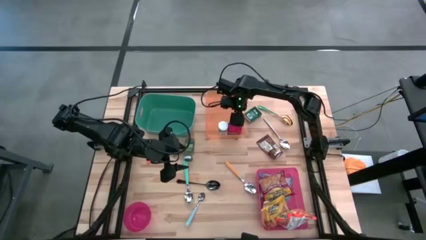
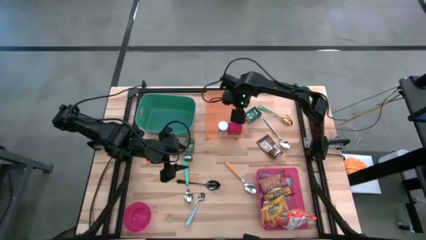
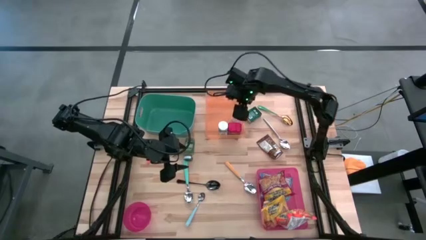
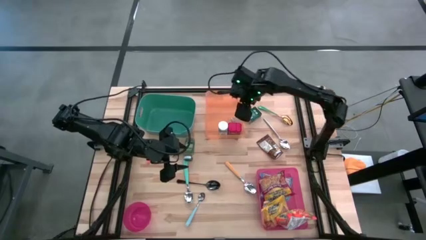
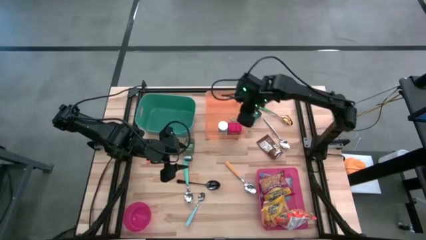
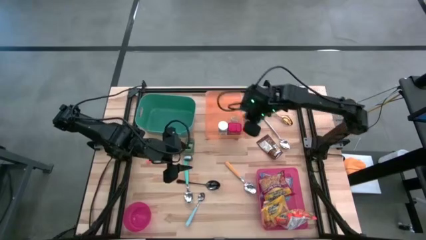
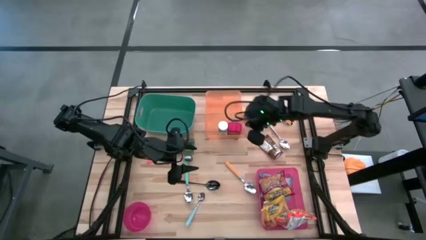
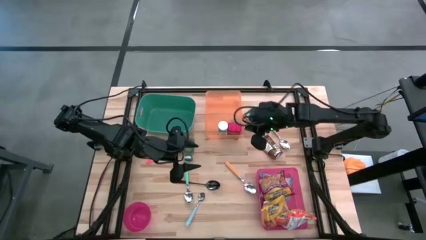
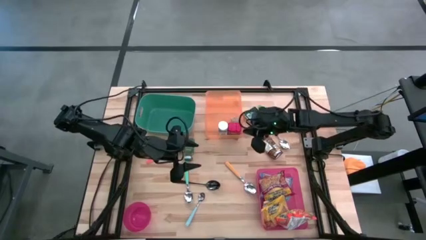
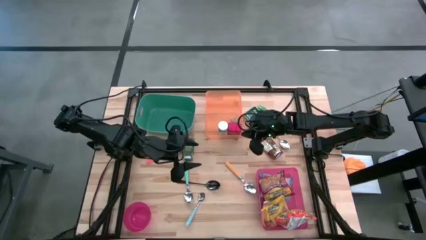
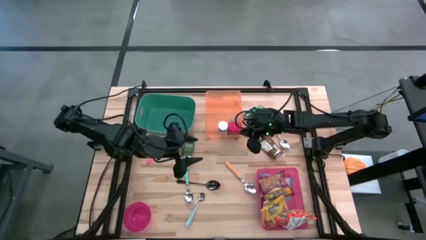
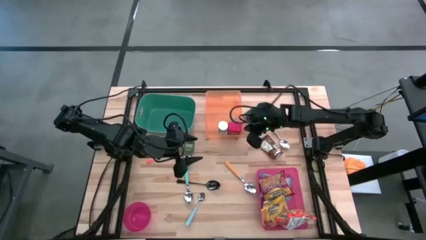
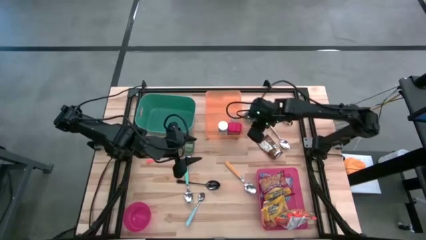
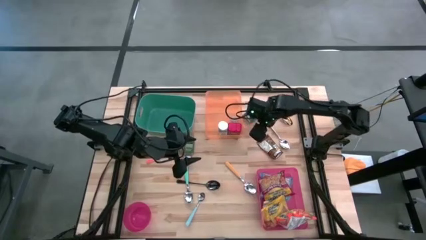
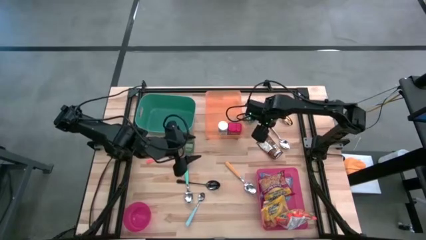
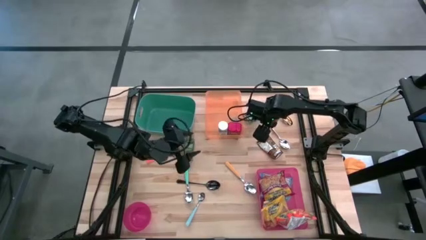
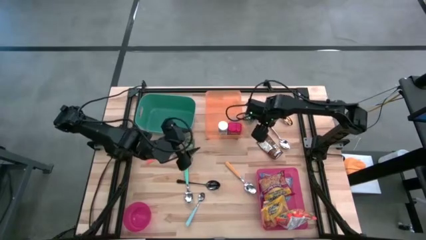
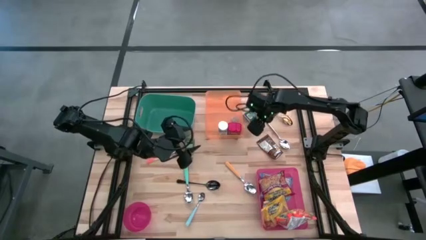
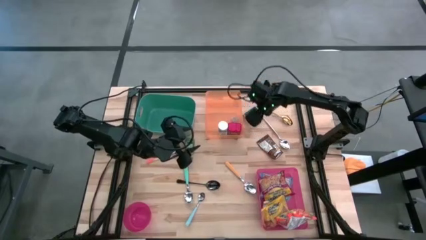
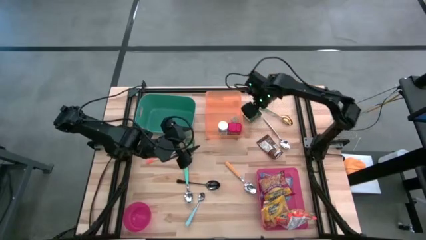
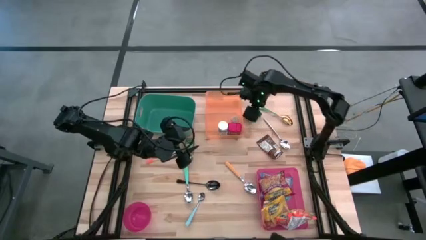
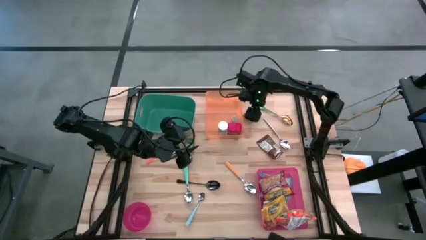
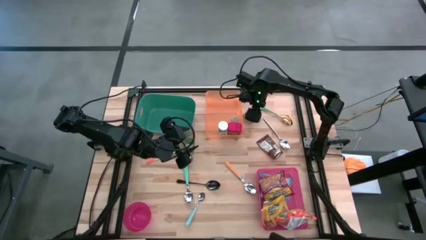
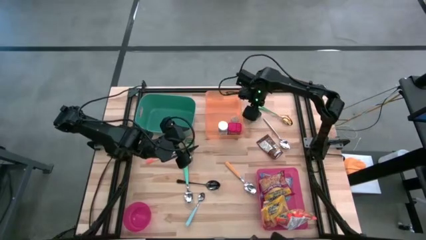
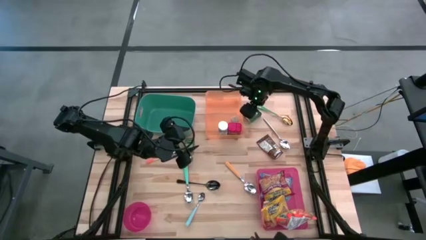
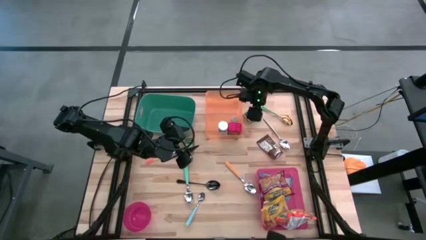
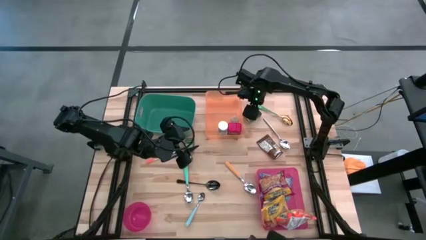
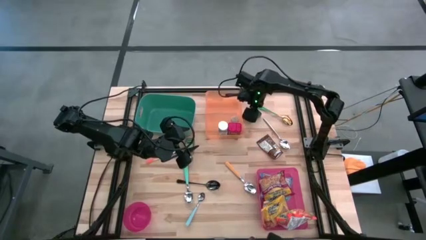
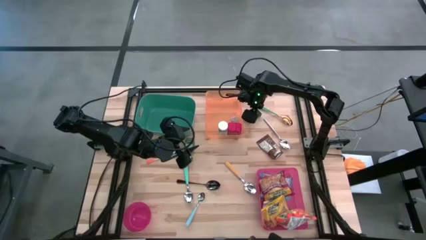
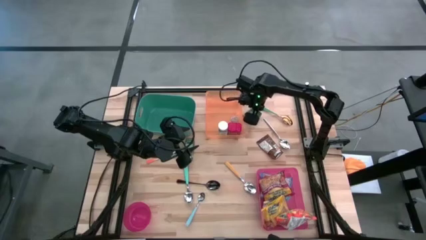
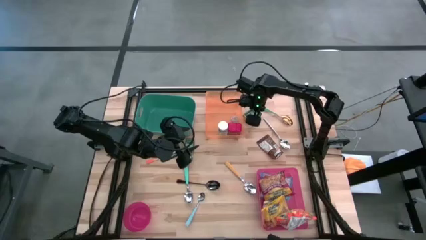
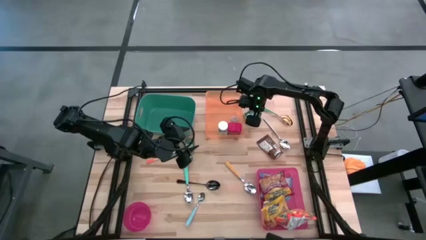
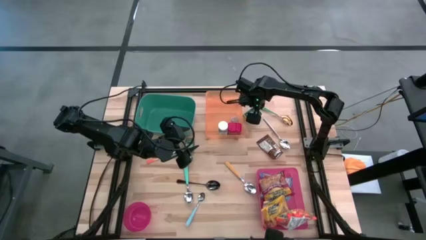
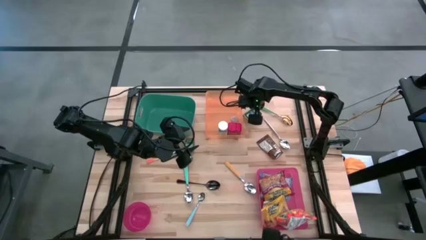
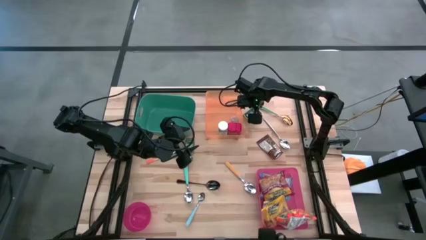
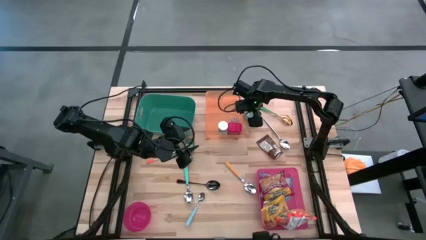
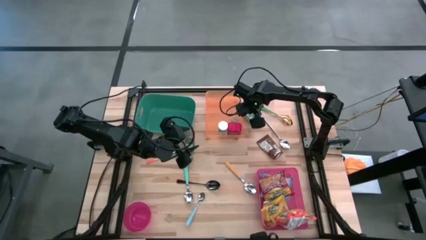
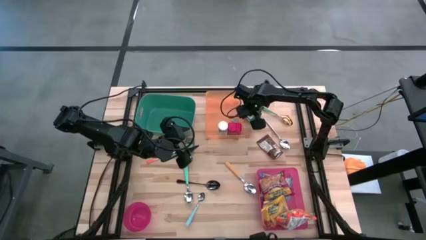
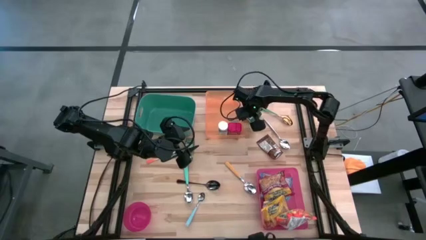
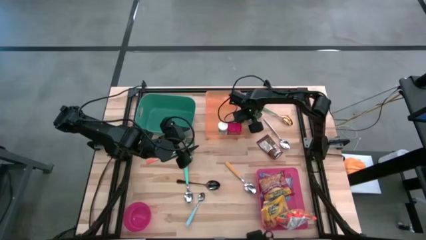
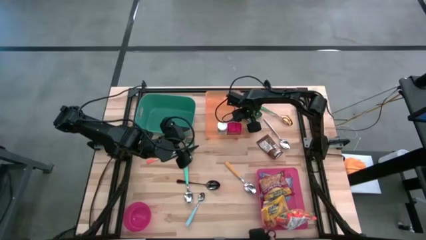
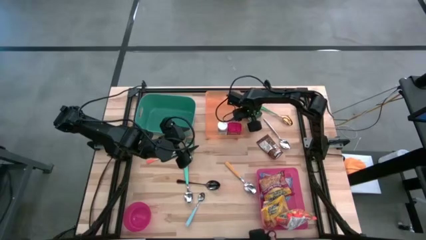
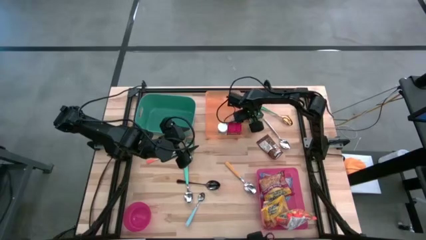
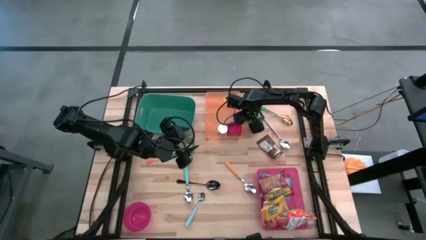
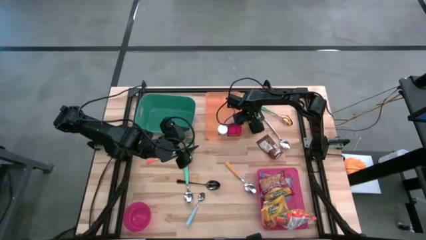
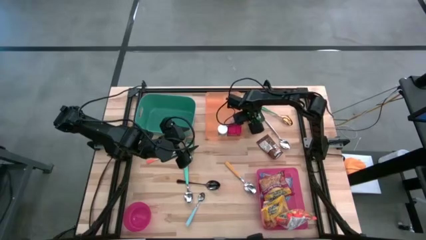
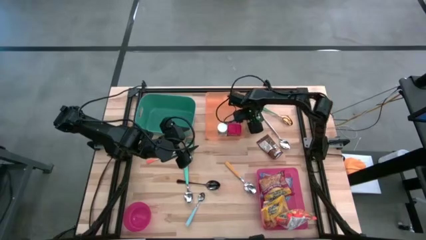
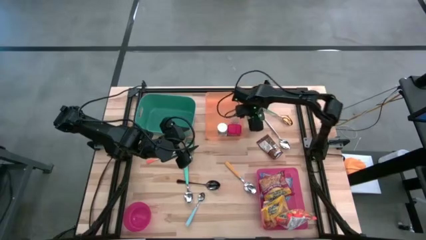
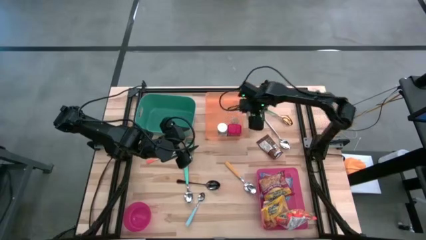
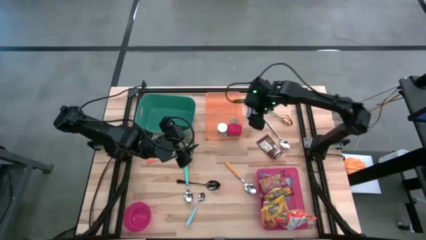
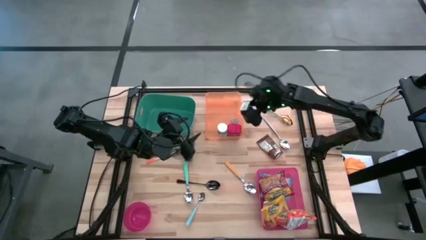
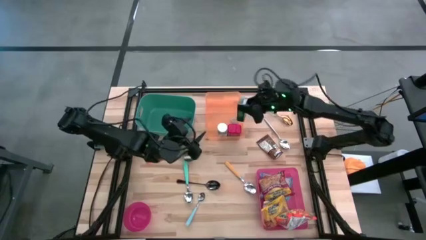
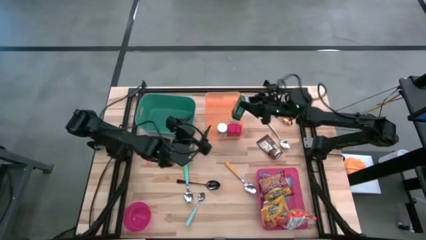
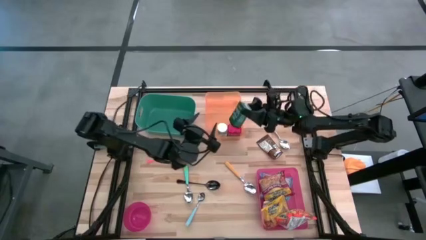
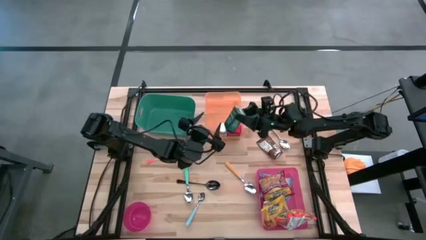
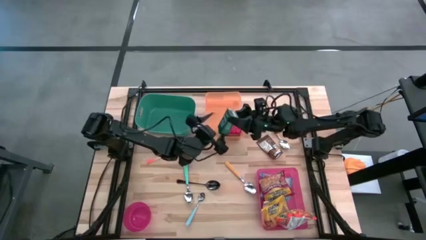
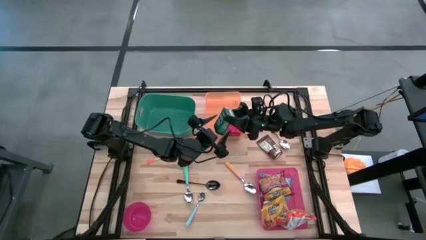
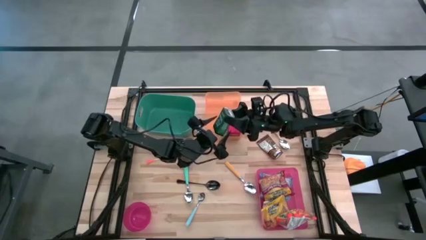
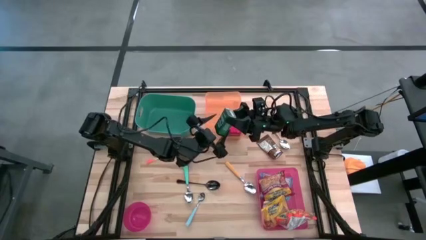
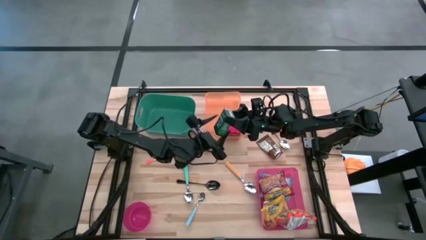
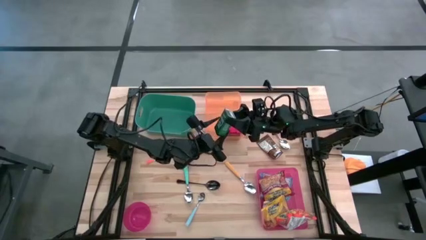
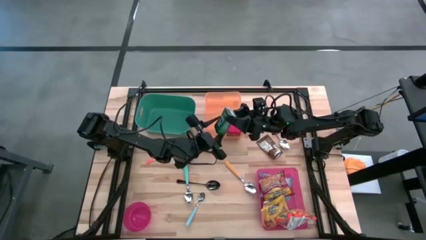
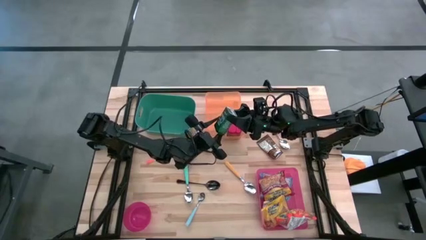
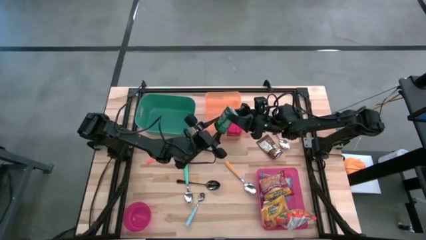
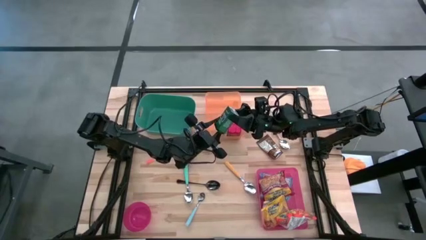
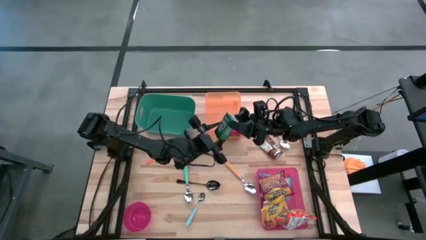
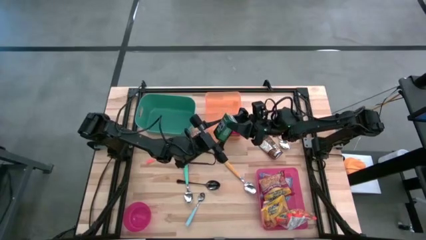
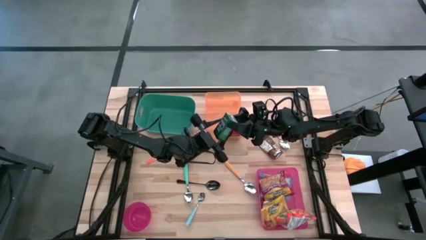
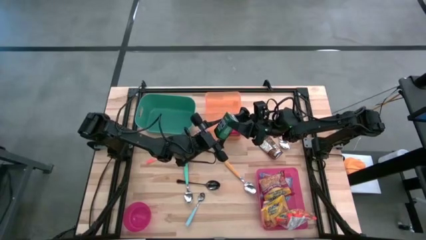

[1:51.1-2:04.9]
Put the black seasoning can into the orange bin
